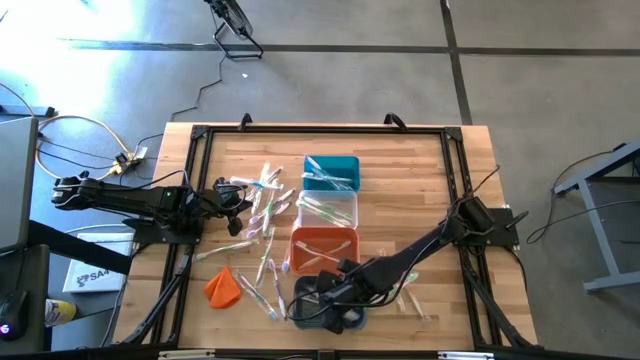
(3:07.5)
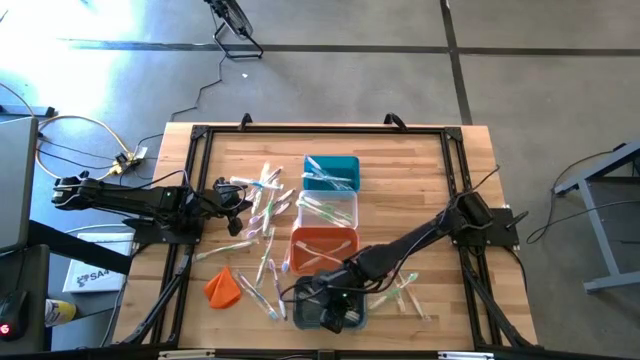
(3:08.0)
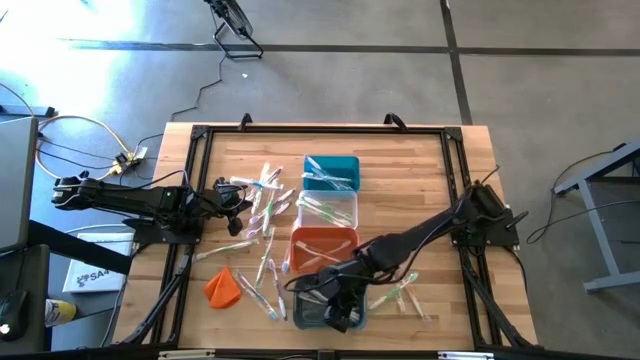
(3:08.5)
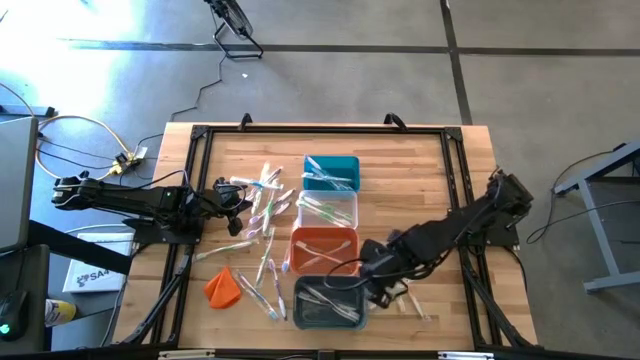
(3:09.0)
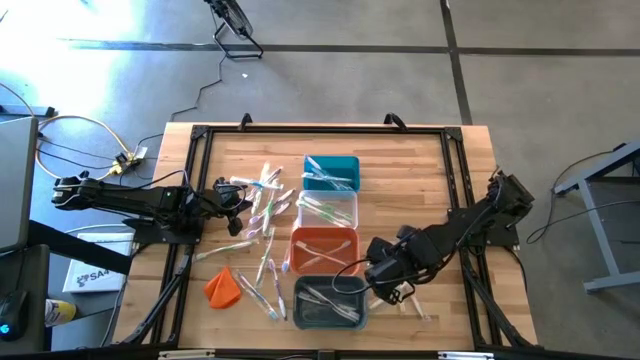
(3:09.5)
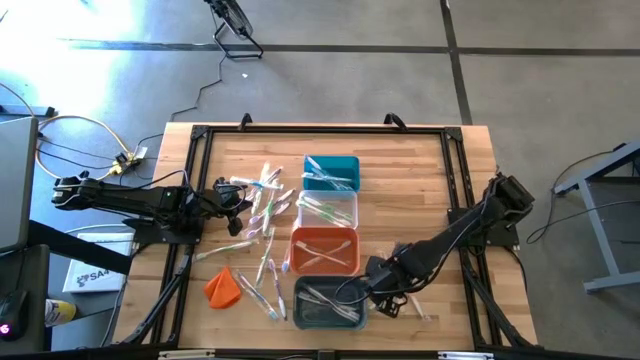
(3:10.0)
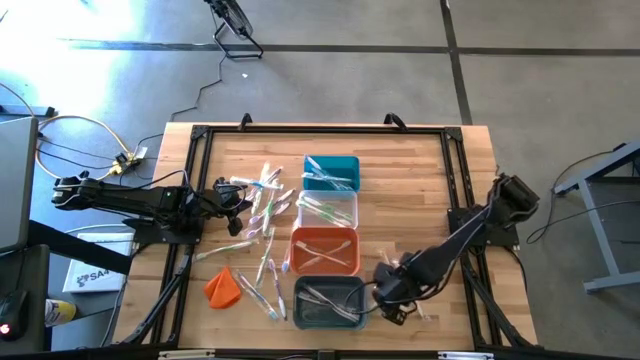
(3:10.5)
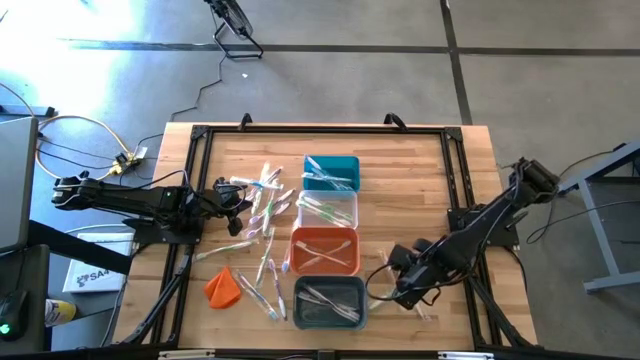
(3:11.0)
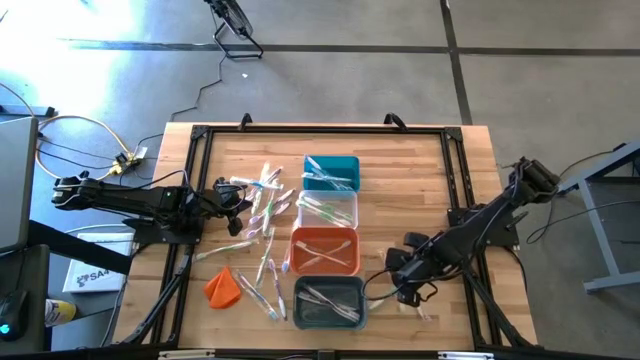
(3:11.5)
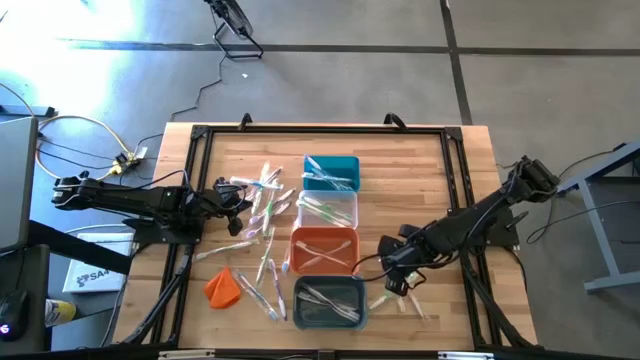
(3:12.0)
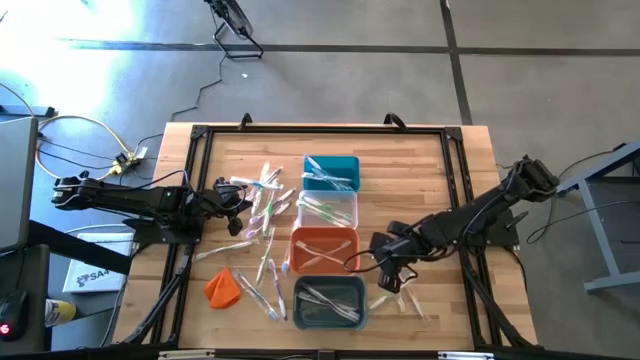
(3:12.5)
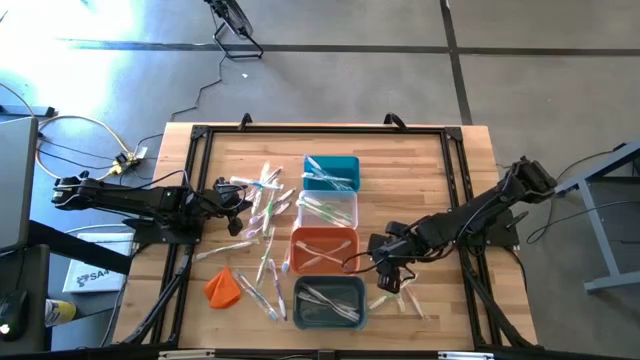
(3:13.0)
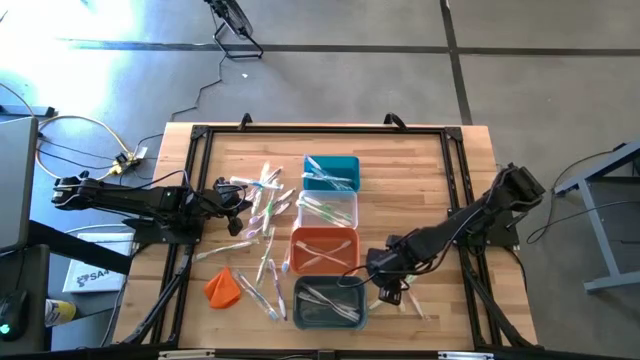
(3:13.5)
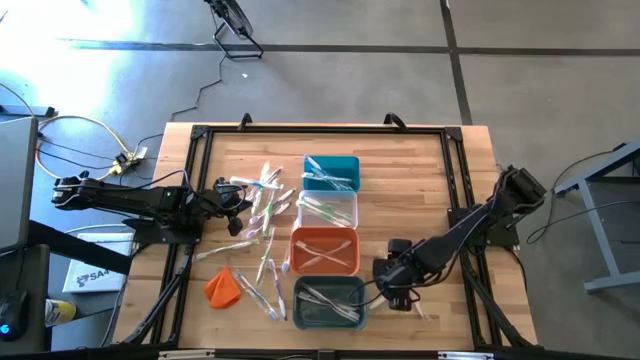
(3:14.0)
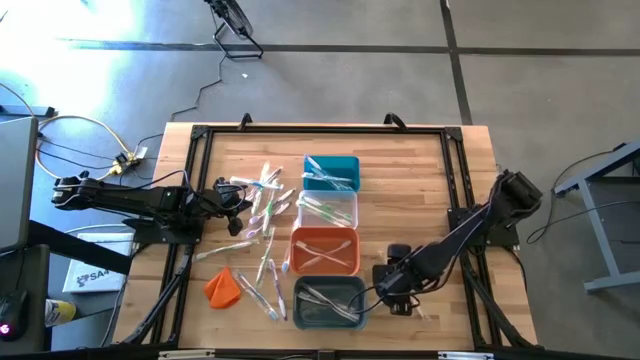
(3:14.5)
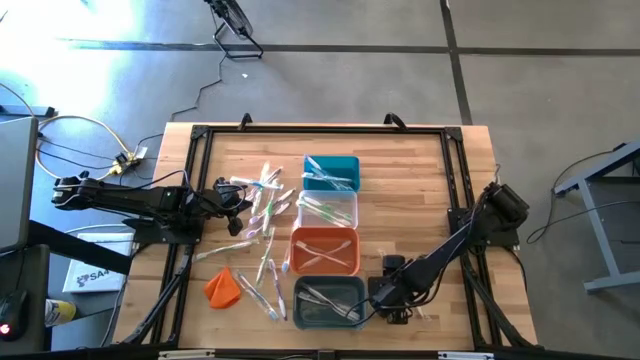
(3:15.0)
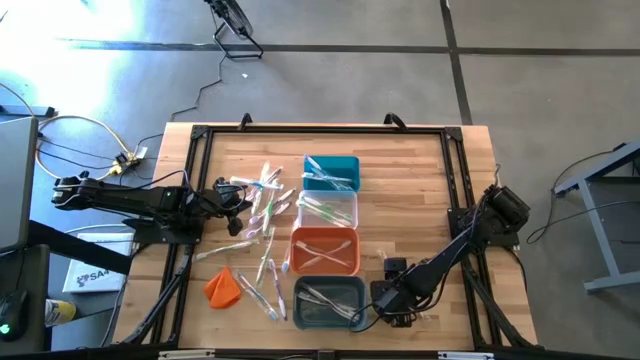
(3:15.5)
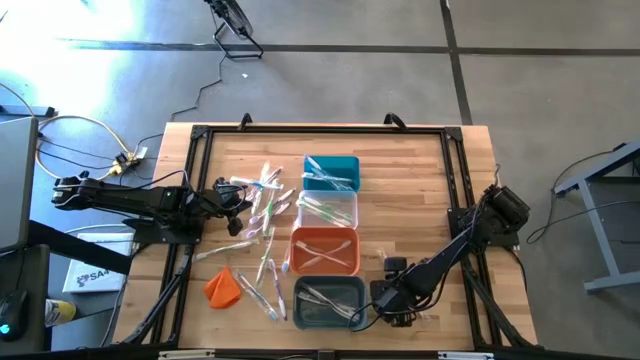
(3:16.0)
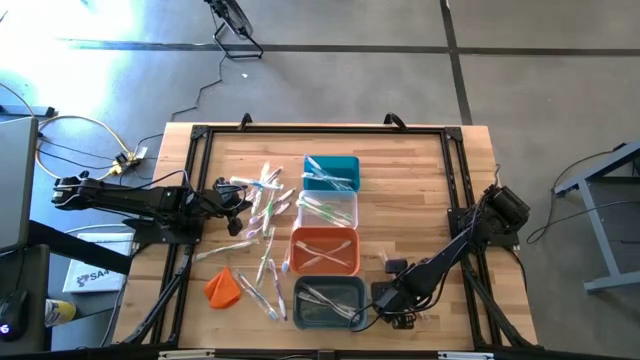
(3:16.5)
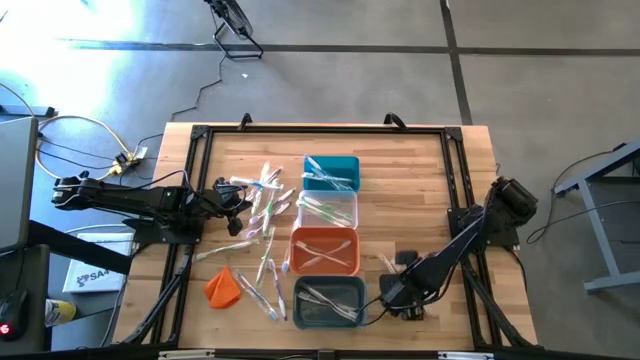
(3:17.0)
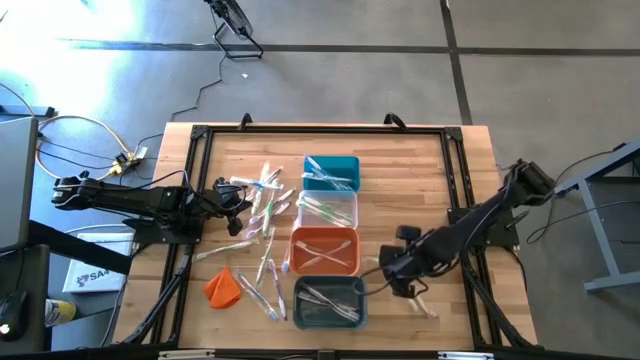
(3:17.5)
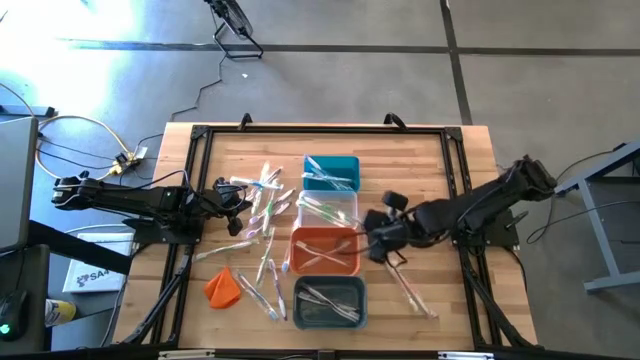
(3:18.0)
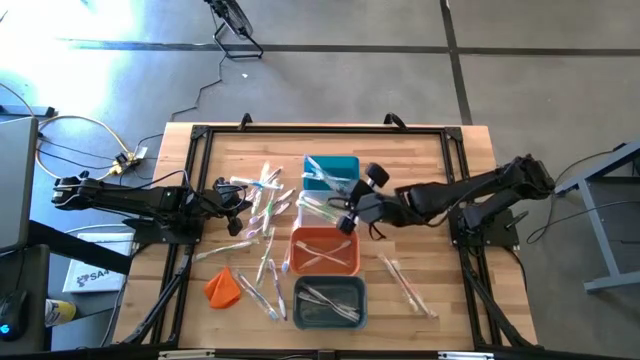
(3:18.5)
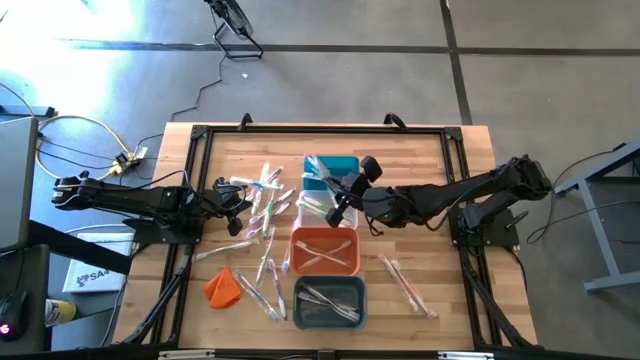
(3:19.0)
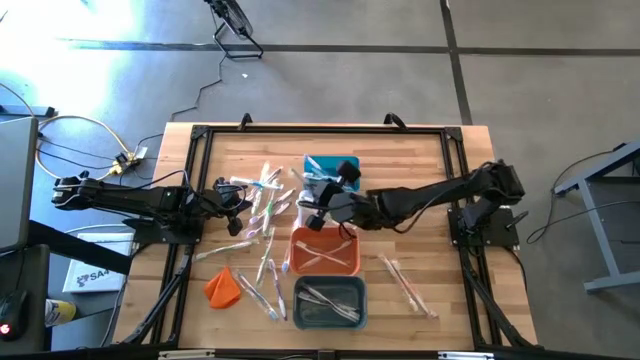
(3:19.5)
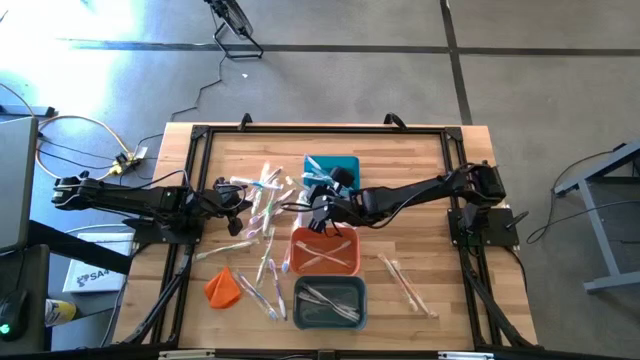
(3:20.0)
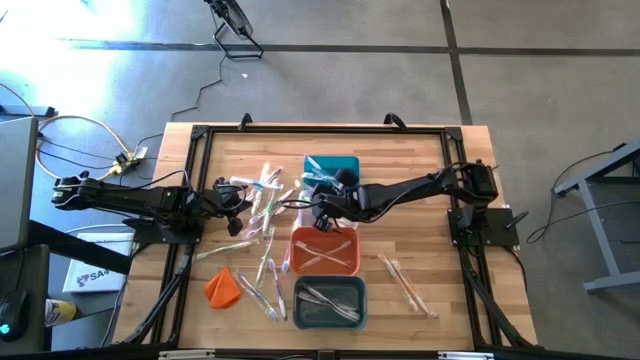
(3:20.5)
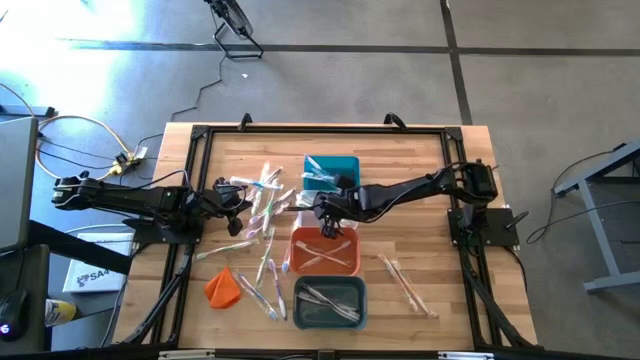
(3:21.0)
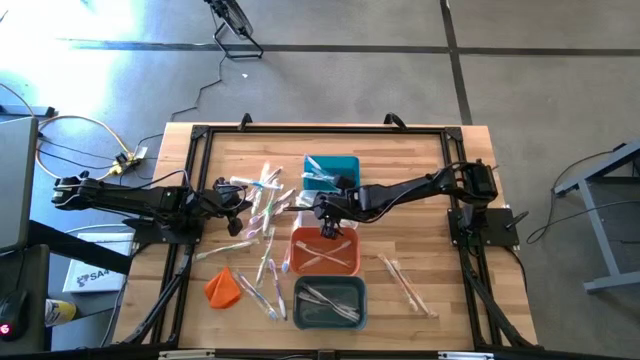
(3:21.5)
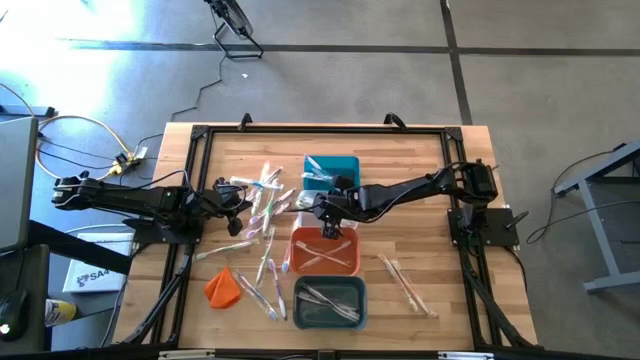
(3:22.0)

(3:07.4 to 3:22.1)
Task: Pick & Place Toothbrushes
Put the green toothbrush into the transparent bin

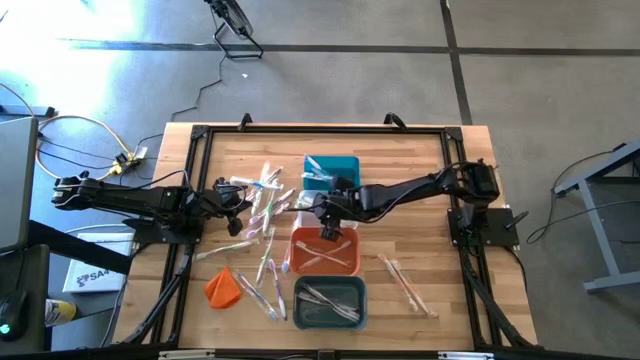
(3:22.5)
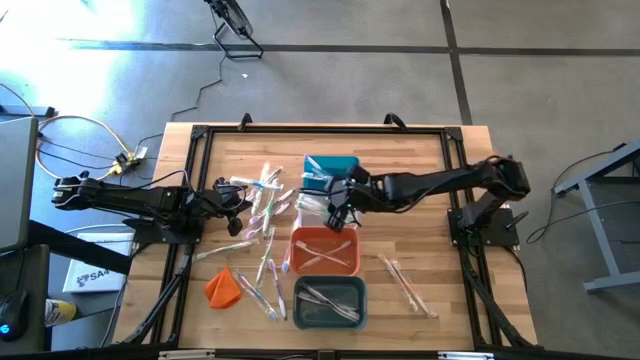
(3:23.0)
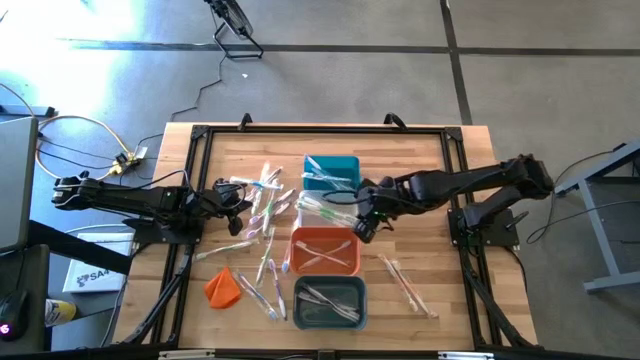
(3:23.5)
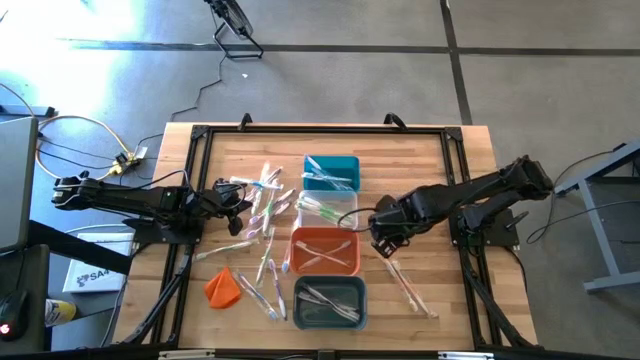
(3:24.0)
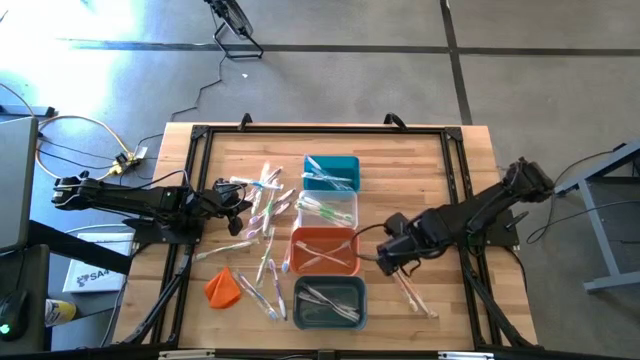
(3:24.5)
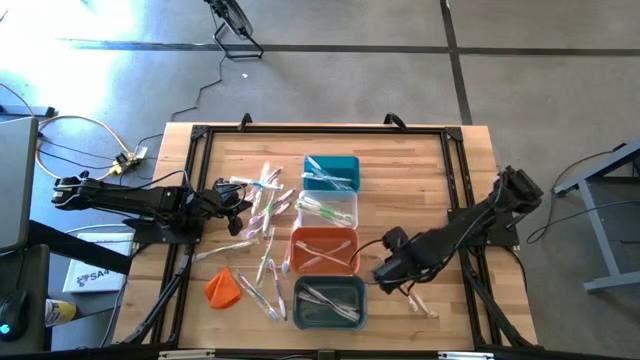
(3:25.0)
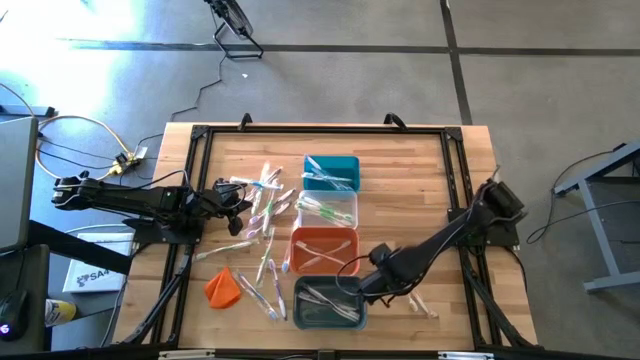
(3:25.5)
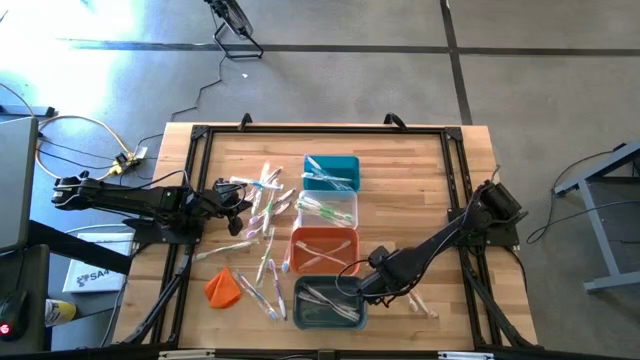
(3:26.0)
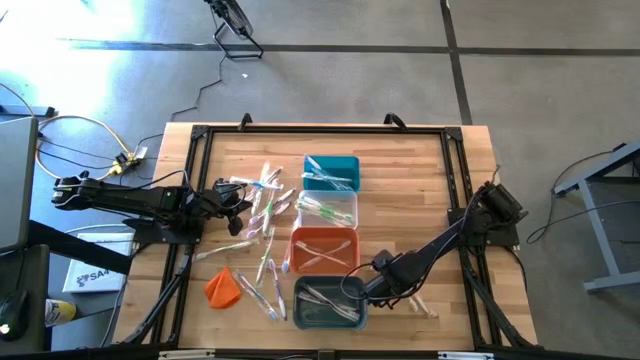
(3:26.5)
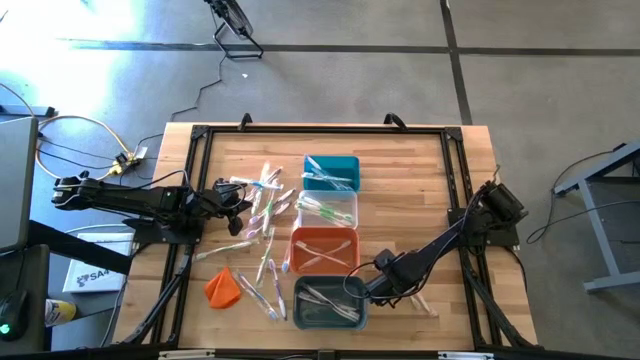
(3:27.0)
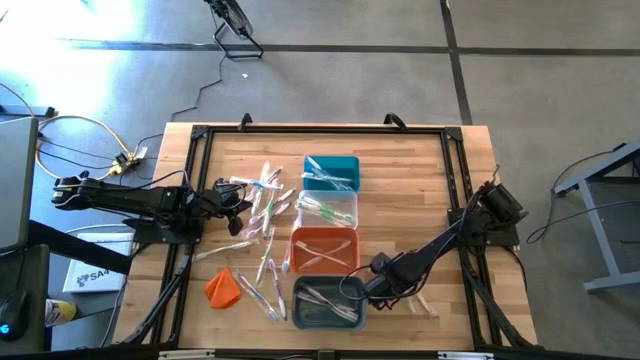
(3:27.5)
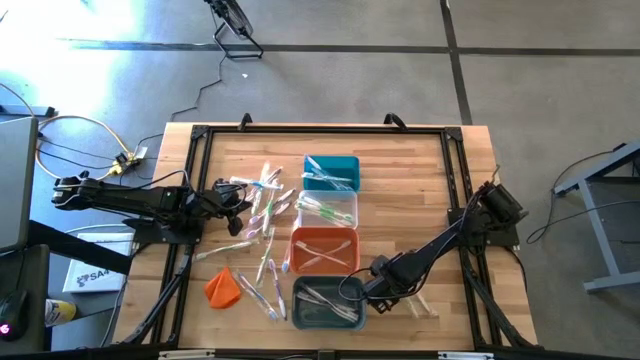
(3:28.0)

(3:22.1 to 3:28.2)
Put the orange toothbrush into the orange bin

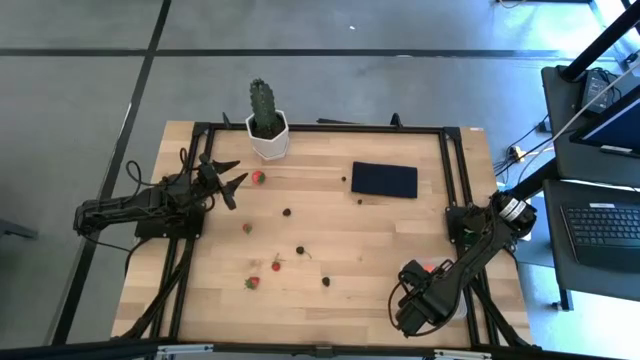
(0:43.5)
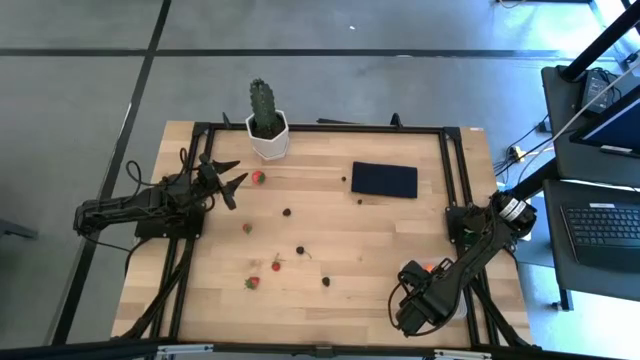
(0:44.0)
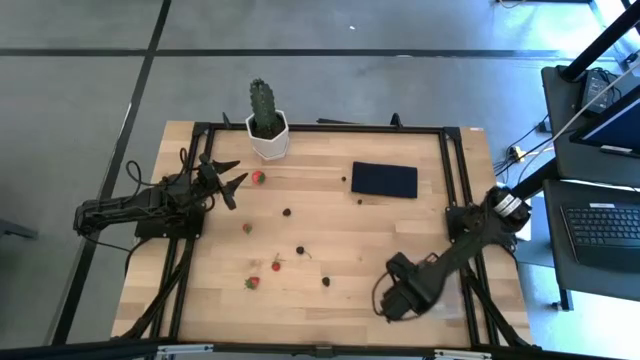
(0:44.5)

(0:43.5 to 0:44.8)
Task: Pick and placing Produce into tupperware
Move the transparent bin towards the center of the table
